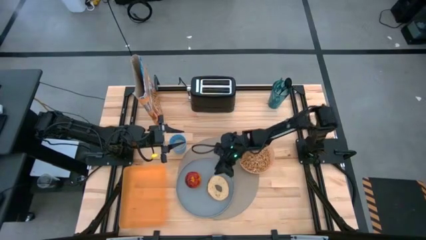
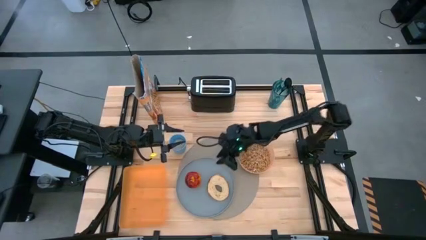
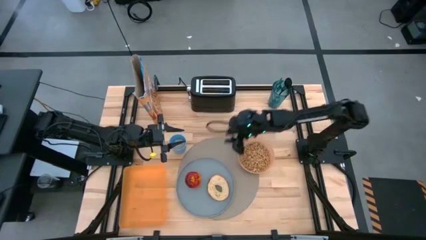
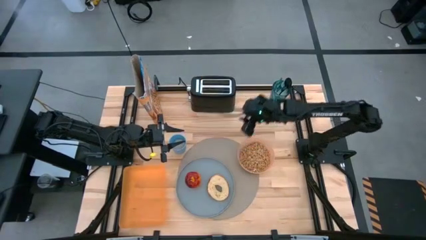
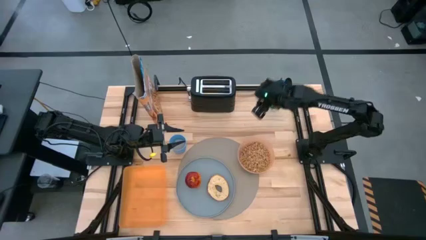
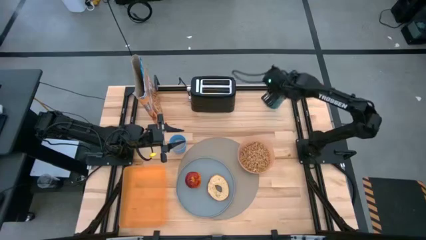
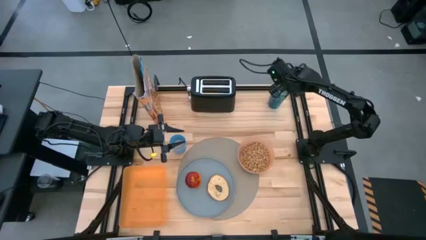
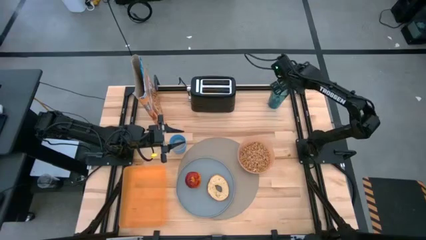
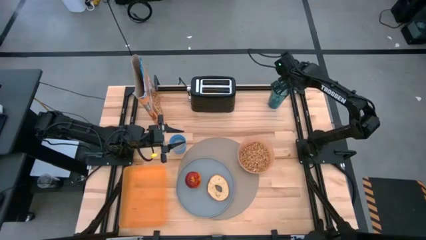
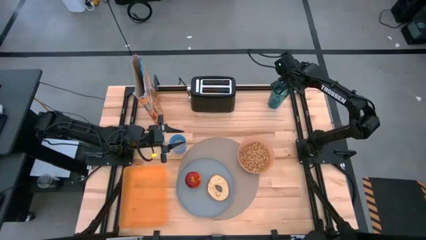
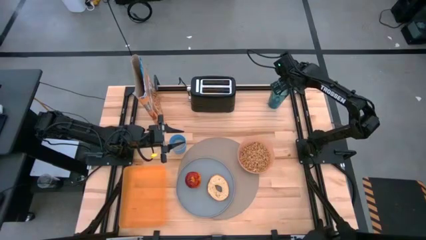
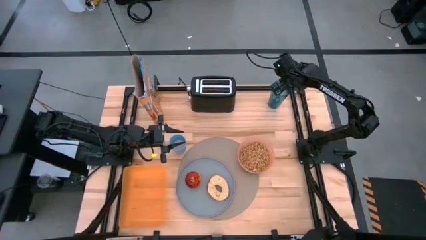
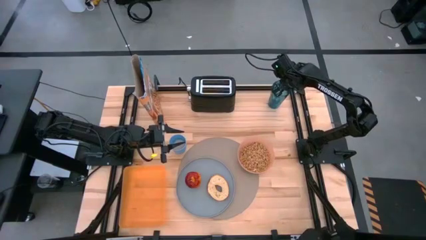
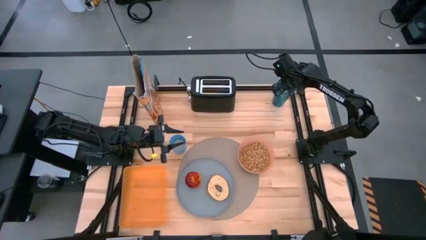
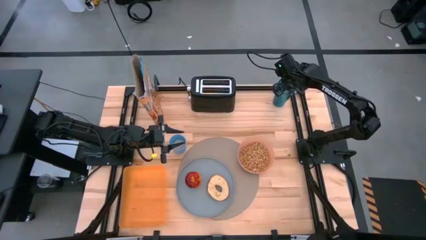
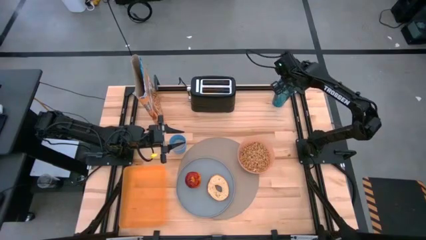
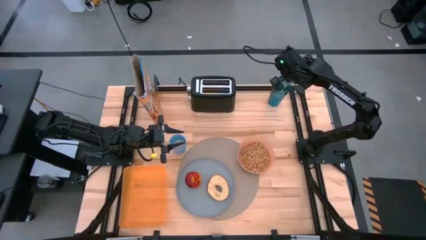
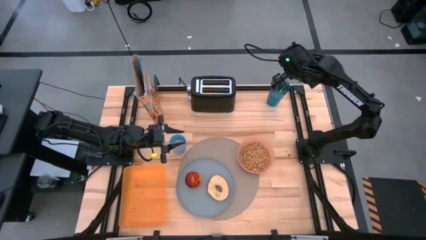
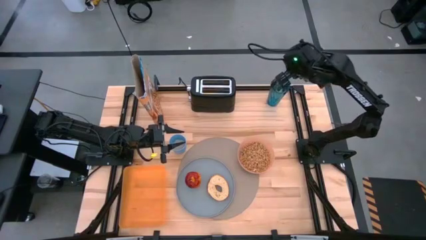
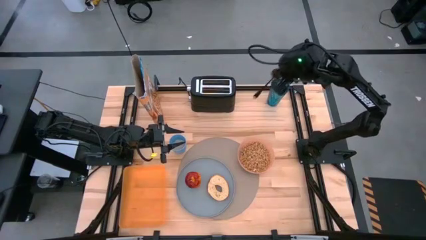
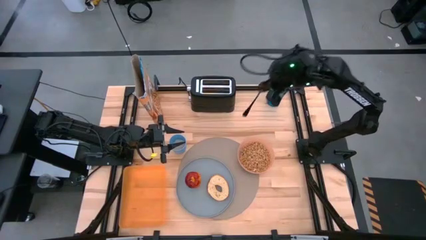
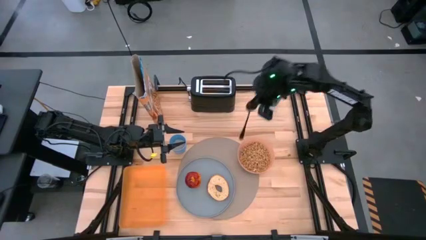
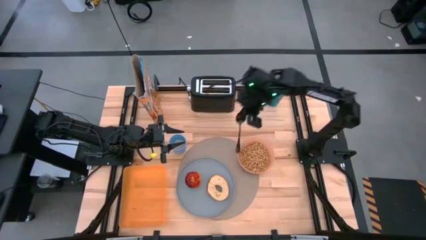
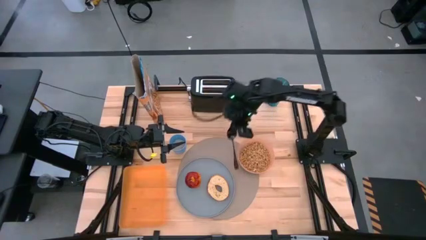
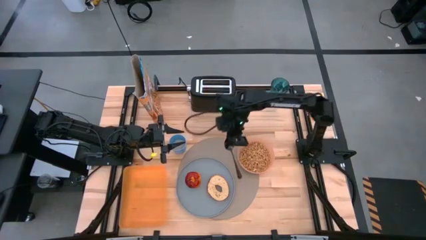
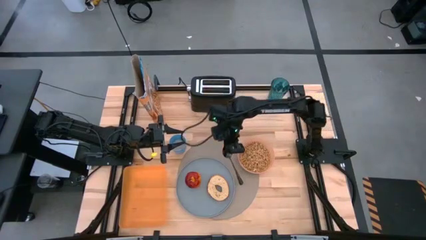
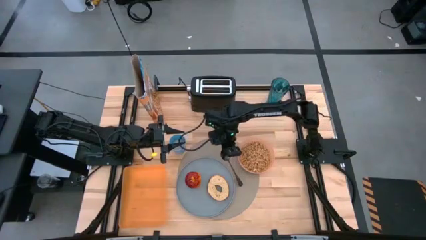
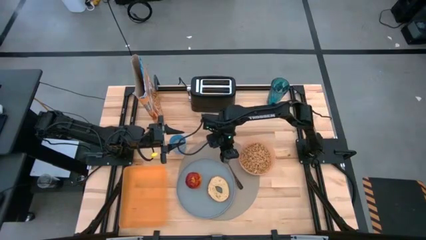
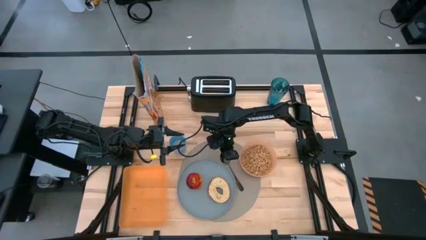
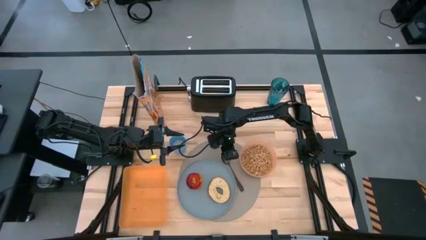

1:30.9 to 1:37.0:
Task: Arrange a breakfast setting
Put the black spoon on the table mat to the right of the blue plate

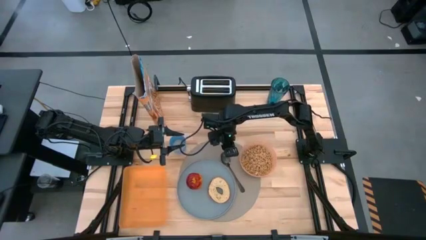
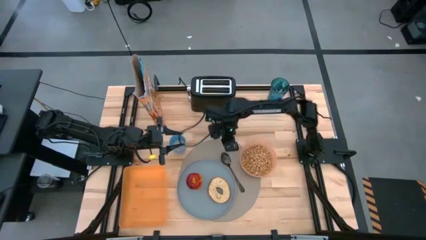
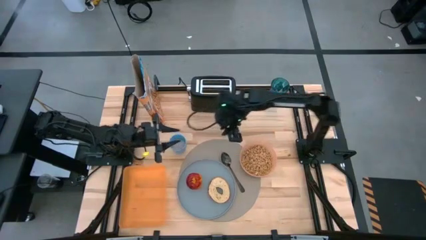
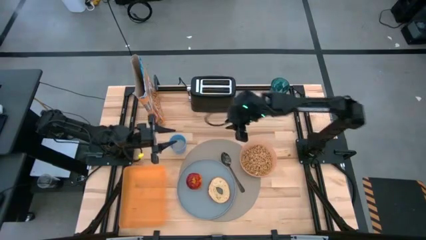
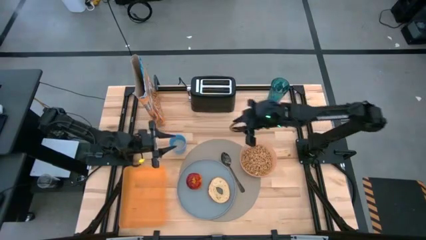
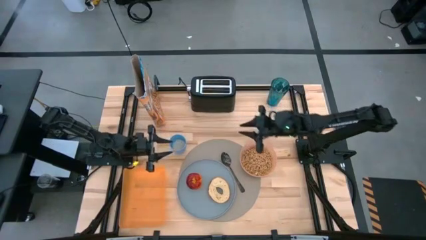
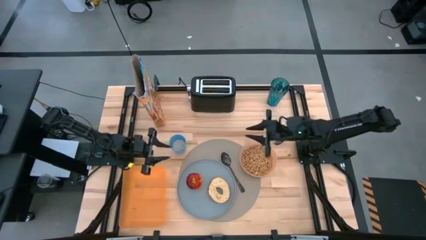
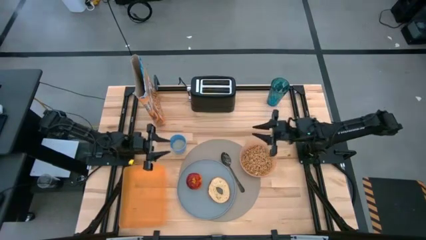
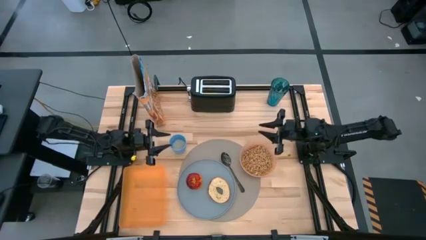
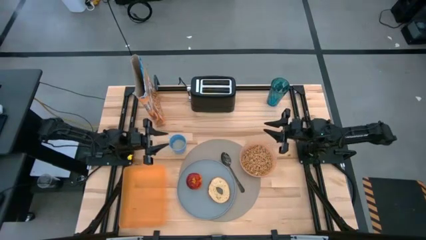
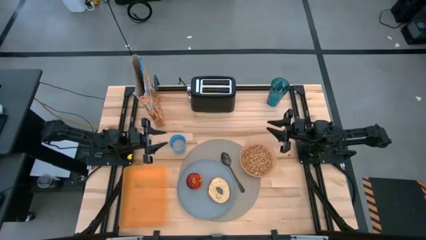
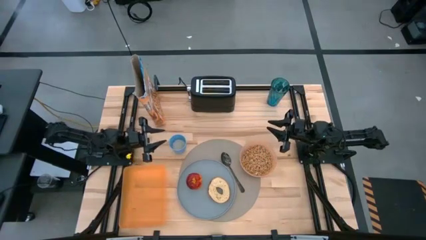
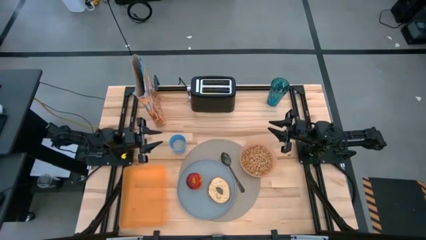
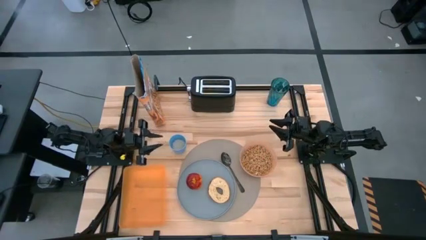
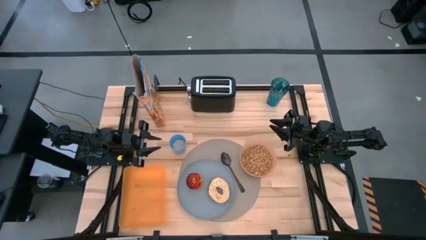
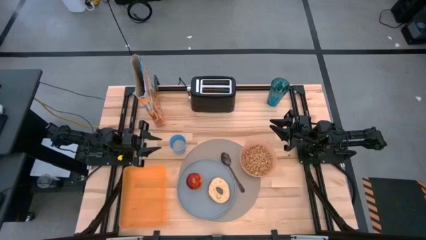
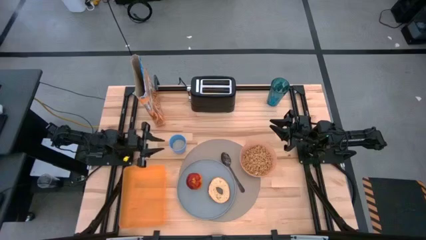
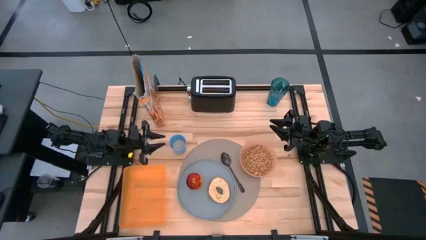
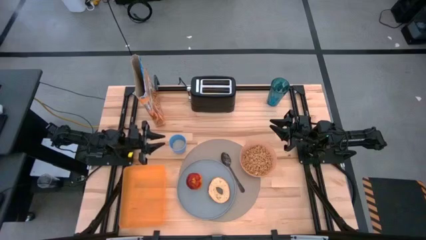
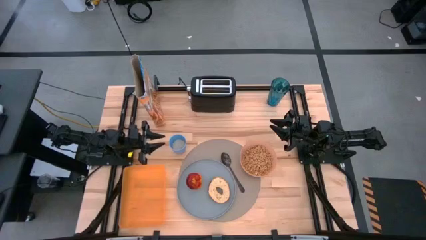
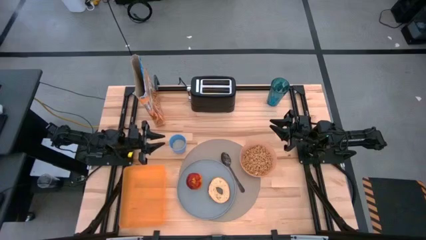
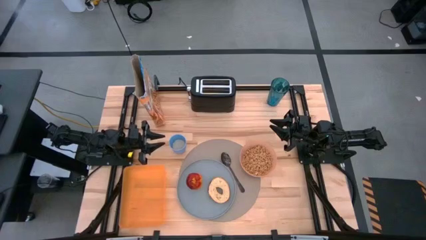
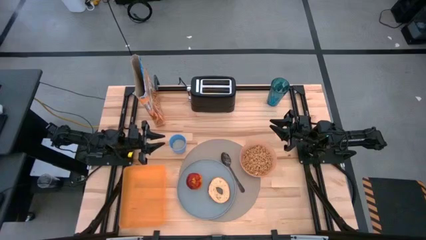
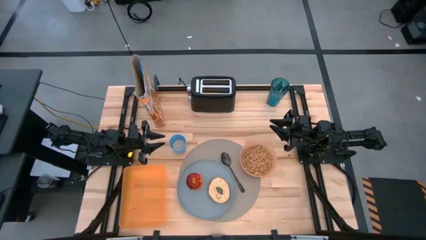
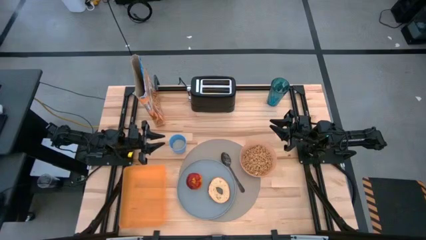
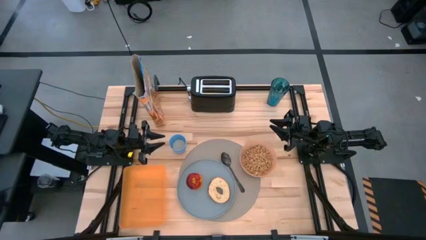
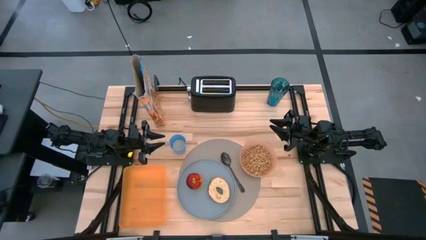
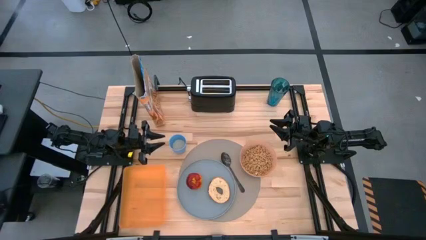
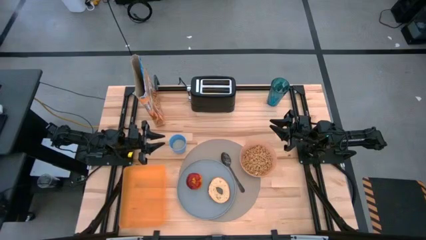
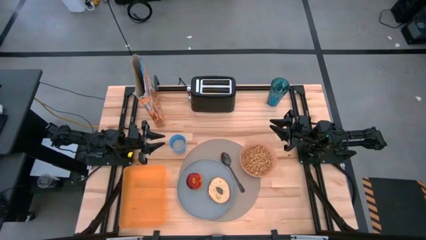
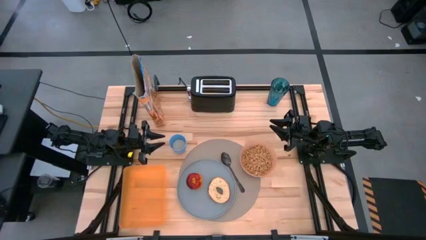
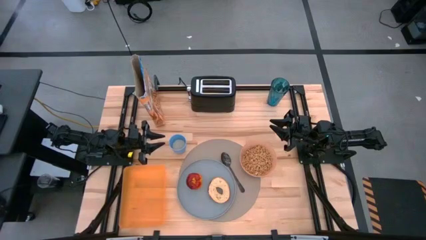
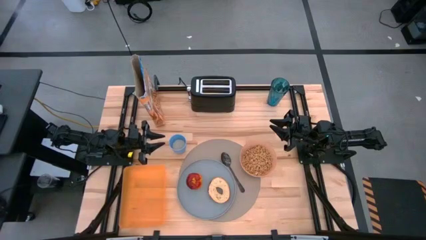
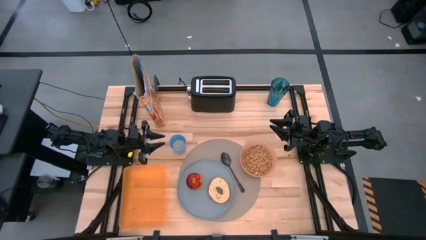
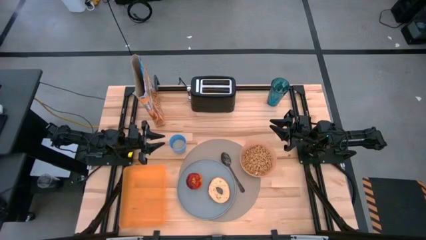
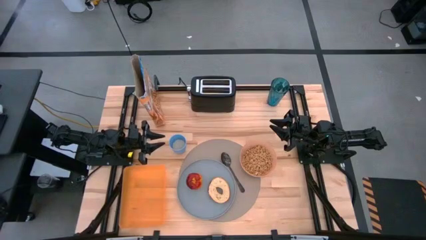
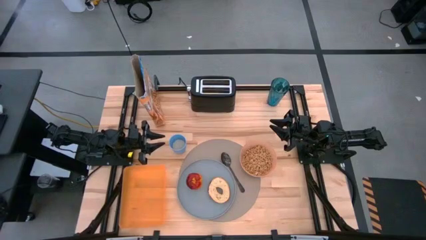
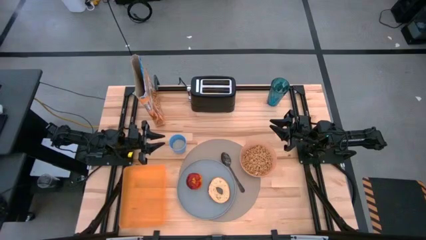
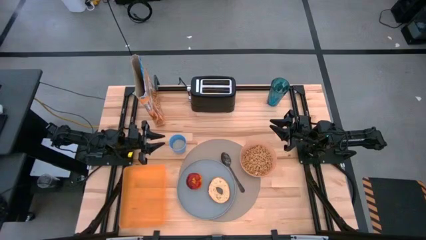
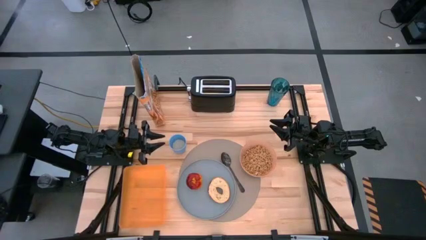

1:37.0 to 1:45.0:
Return to Home Position
